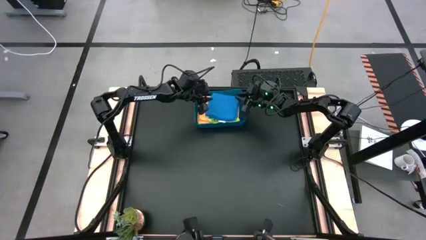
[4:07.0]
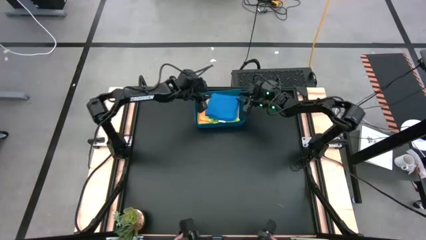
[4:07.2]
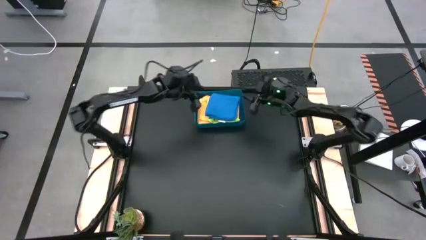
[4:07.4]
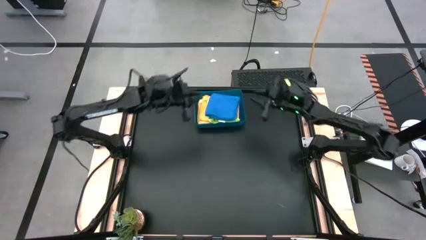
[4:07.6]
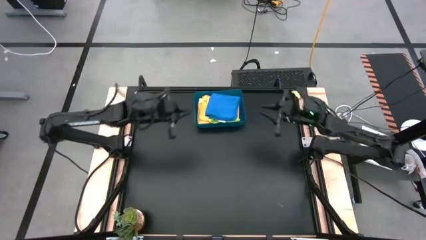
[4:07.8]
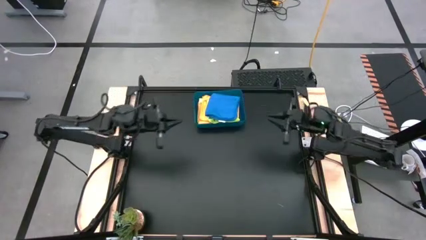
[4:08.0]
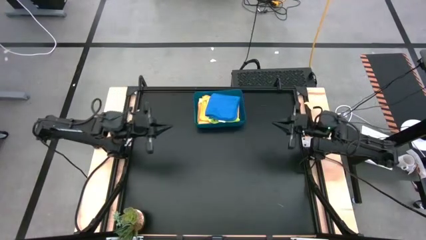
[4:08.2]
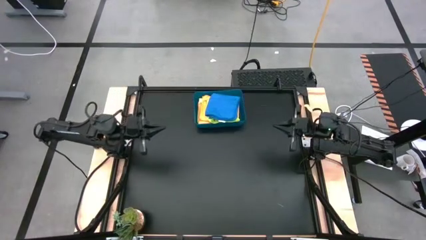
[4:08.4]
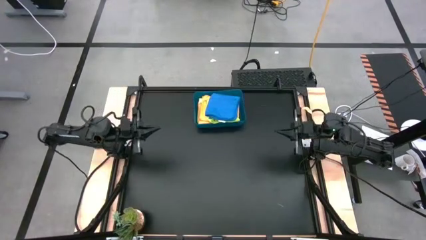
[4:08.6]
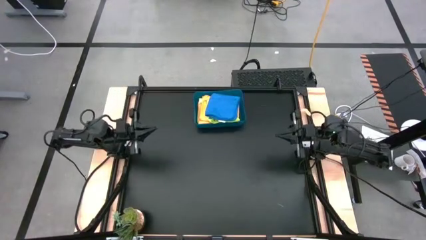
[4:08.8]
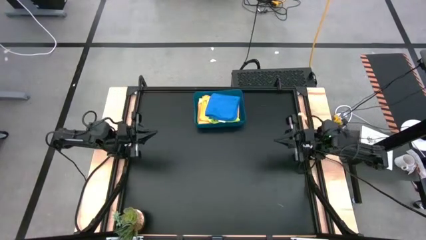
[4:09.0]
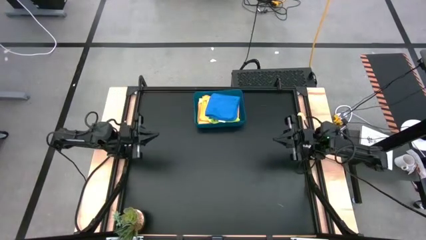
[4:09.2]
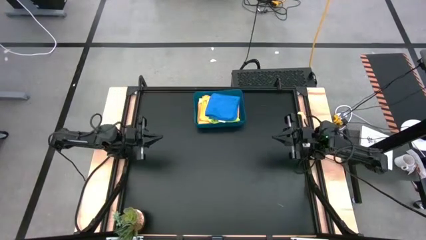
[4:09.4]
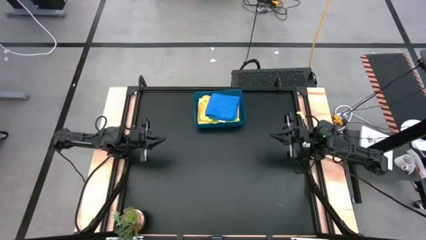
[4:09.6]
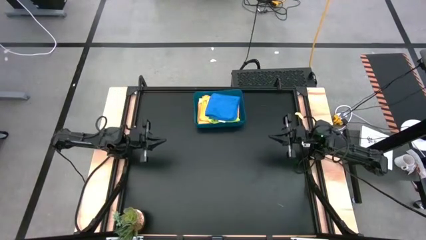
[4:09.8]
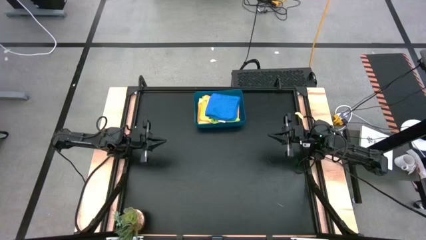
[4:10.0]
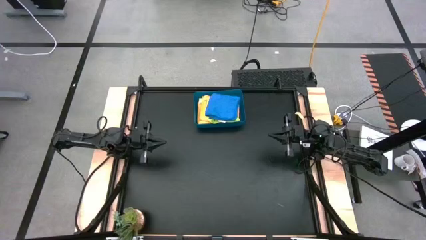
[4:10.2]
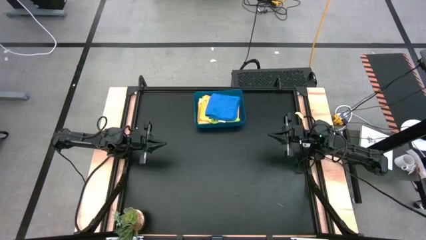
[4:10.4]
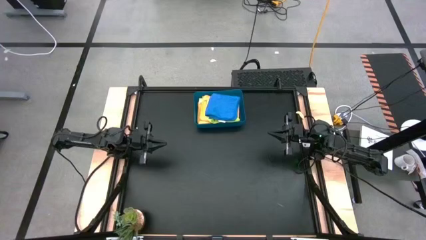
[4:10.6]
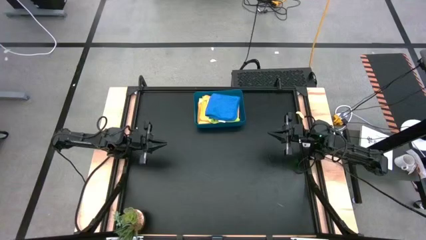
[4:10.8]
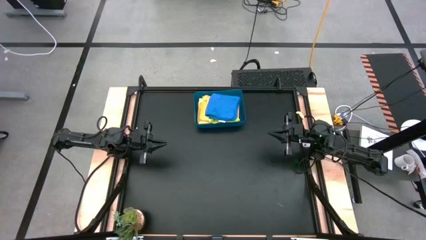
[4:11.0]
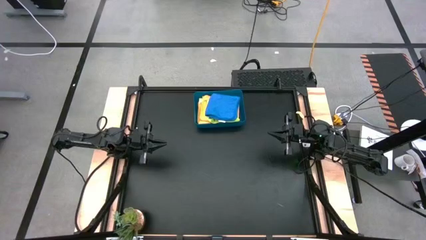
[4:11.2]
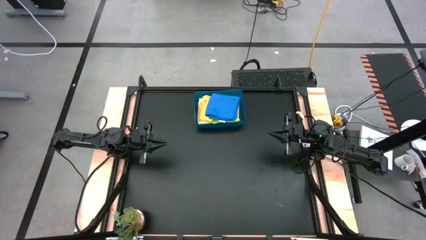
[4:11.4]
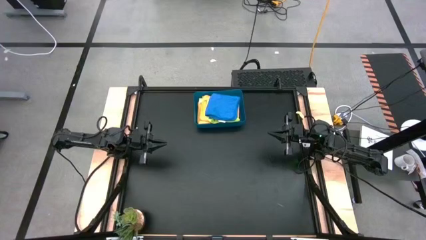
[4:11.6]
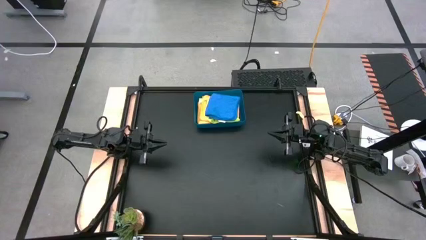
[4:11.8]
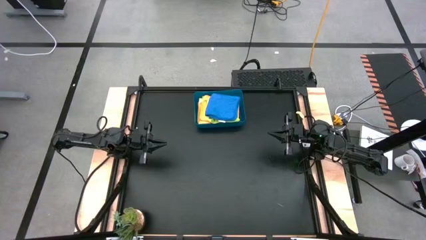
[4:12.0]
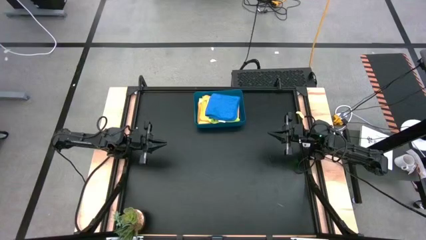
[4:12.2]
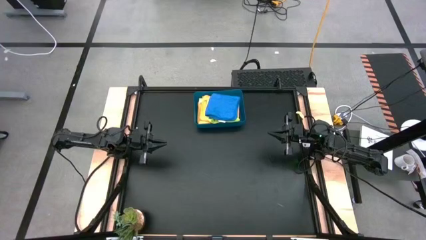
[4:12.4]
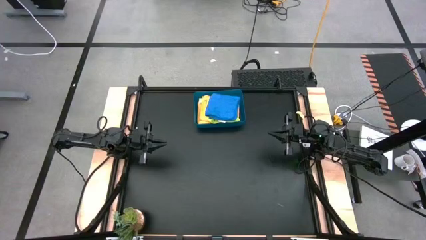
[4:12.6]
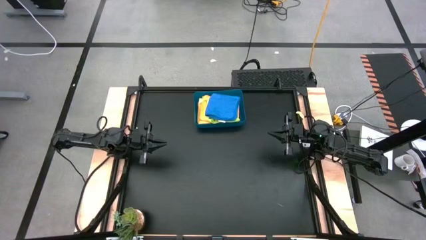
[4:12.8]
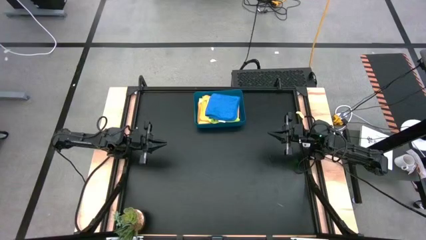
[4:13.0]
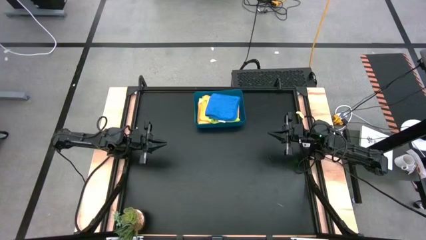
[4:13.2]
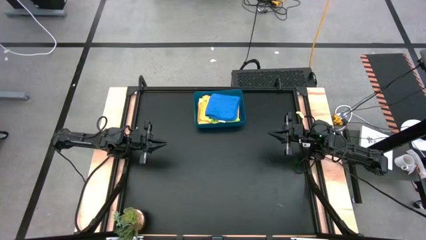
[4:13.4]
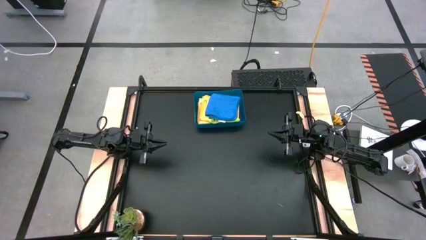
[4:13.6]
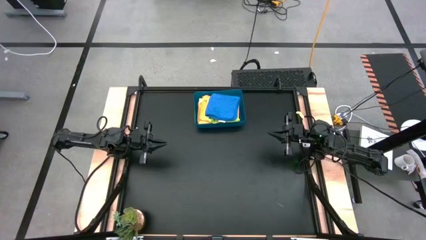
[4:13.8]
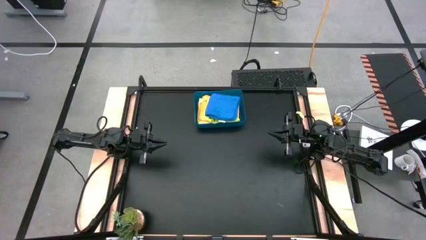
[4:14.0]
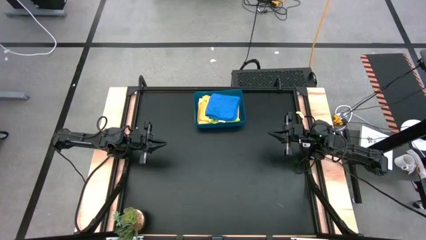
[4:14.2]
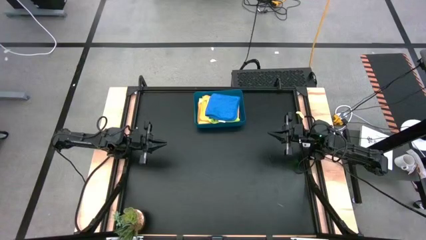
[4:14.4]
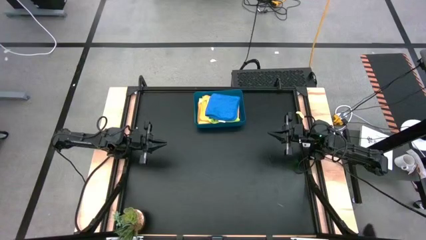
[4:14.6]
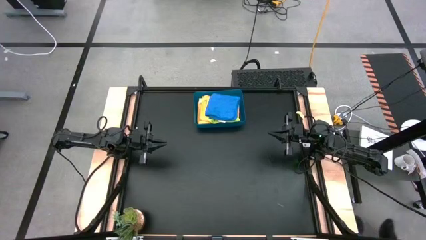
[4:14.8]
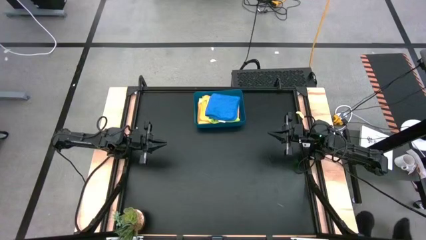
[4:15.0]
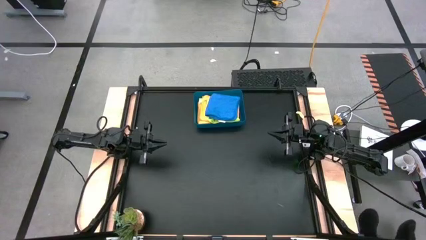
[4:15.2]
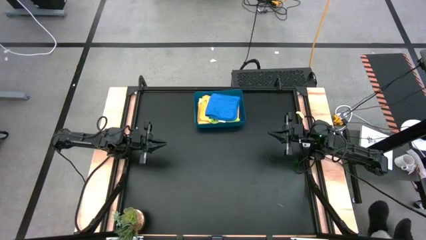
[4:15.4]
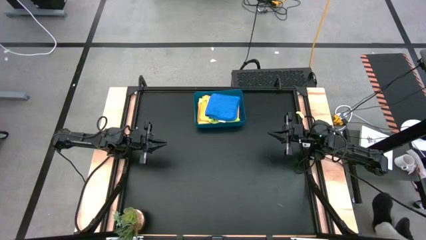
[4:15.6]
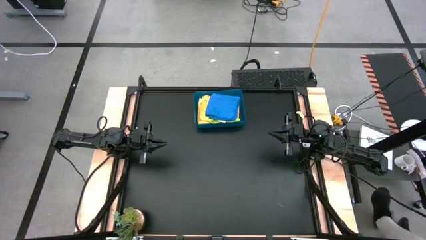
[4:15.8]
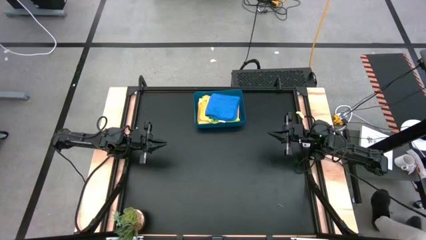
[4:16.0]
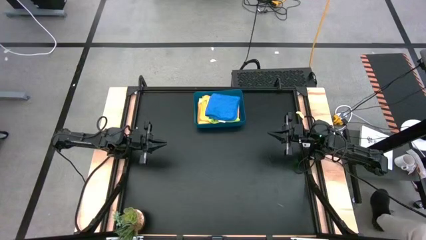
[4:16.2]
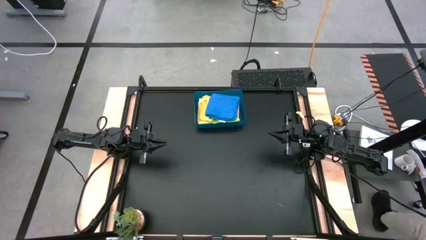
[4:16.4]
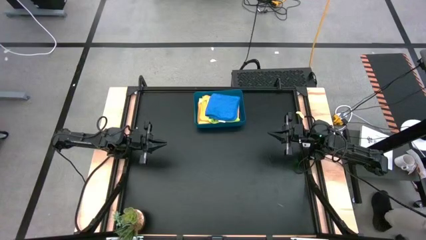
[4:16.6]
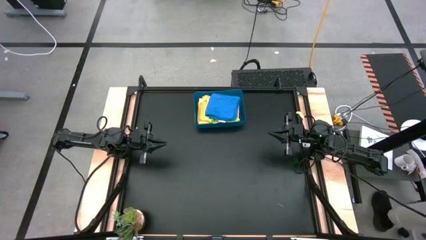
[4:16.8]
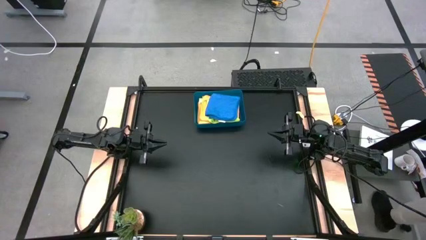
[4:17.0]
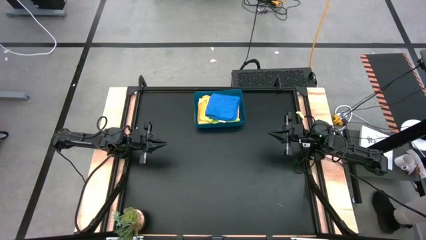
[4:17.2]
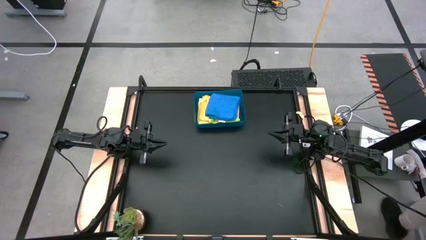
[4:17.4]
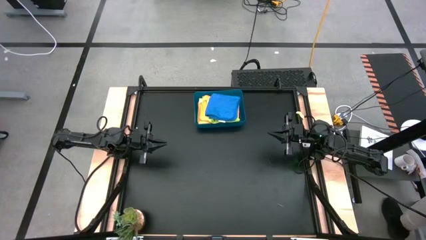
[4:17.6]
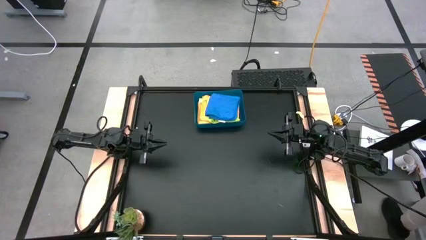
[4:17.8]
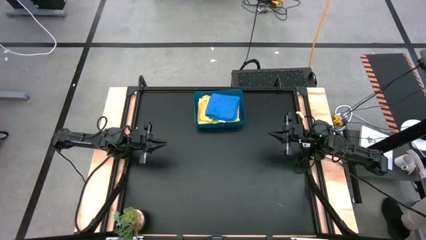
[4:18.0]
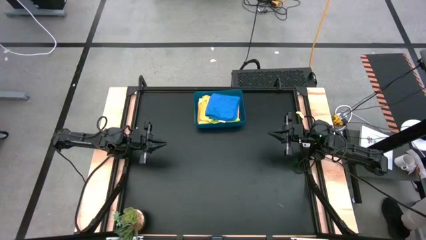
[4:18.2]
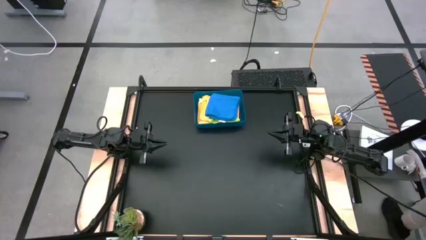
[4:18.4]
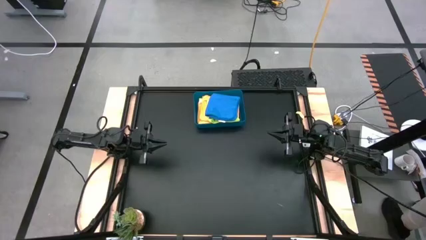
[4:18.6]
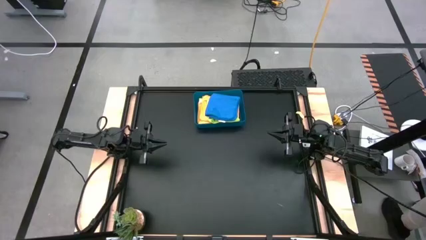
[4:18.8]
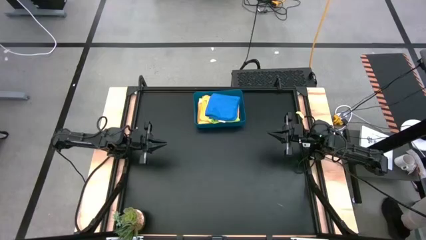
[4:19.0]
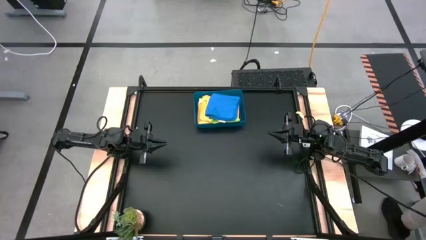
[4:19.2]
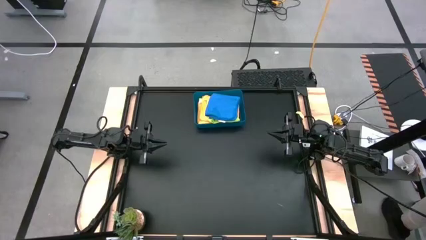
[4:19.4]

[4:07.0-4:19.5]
Task: Fold microfiber towels
Return to Home Position
